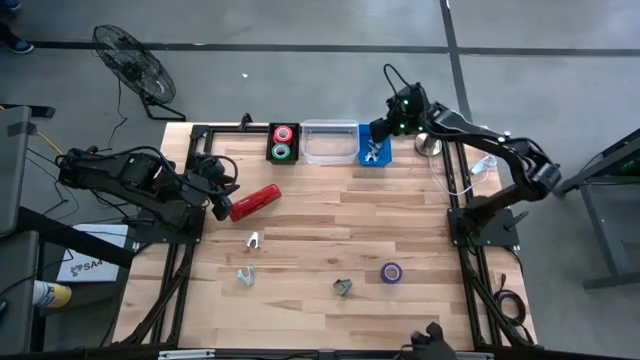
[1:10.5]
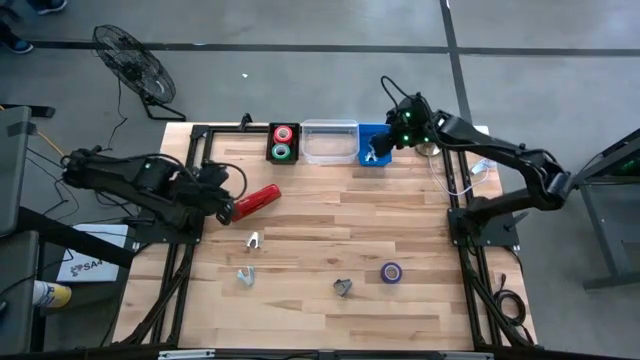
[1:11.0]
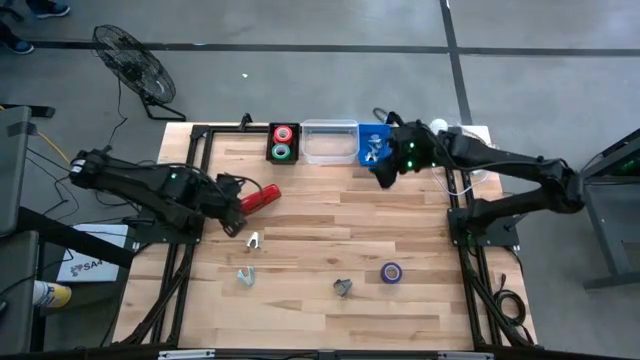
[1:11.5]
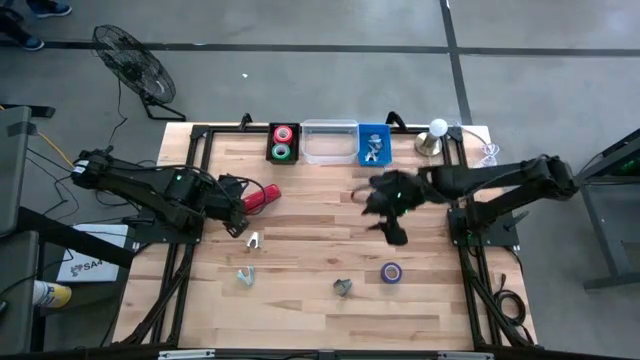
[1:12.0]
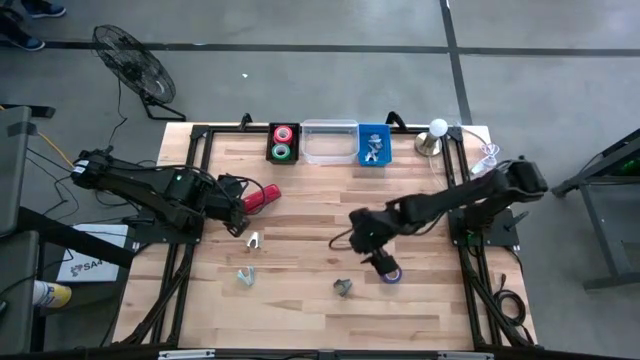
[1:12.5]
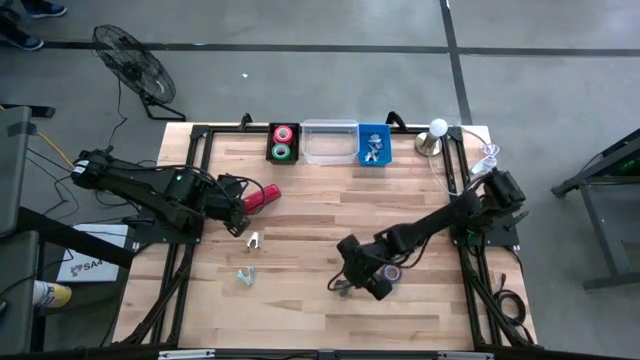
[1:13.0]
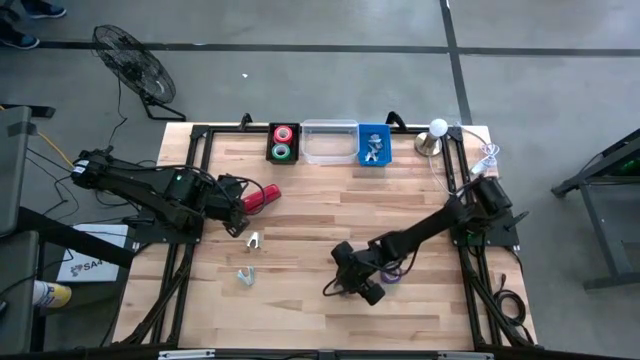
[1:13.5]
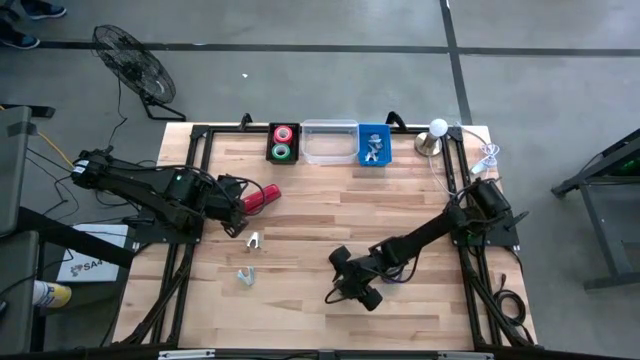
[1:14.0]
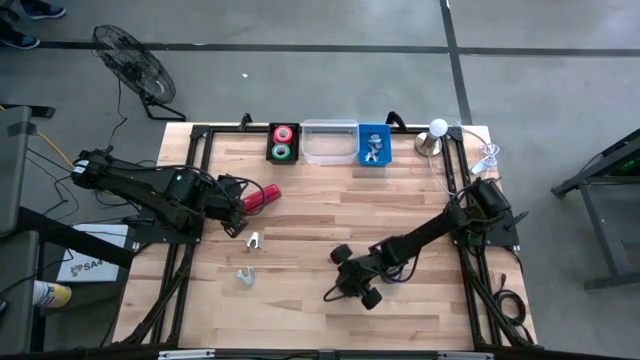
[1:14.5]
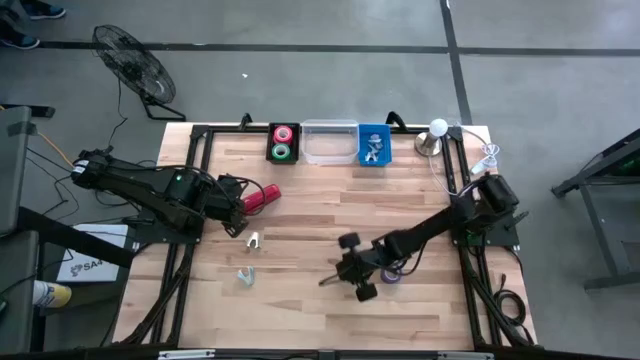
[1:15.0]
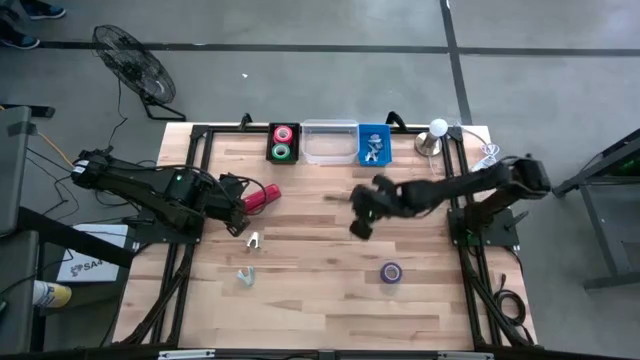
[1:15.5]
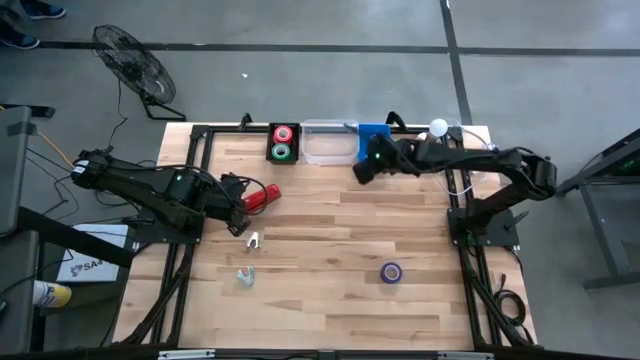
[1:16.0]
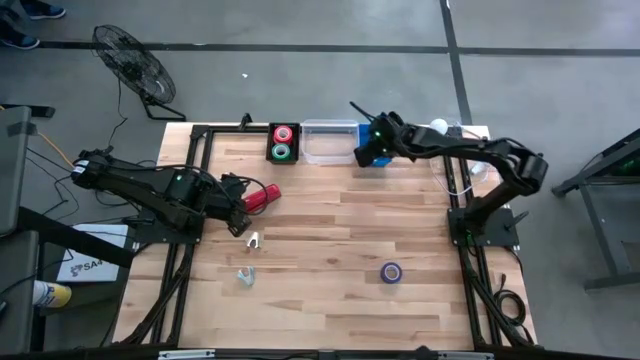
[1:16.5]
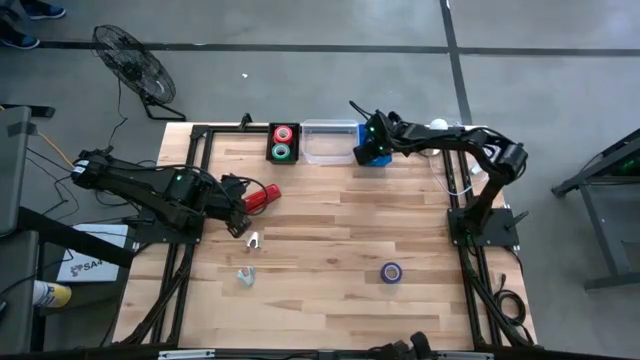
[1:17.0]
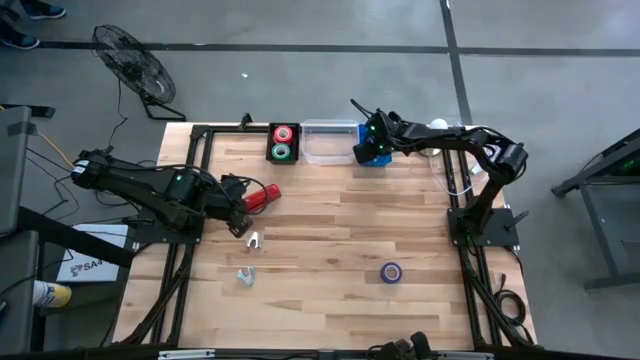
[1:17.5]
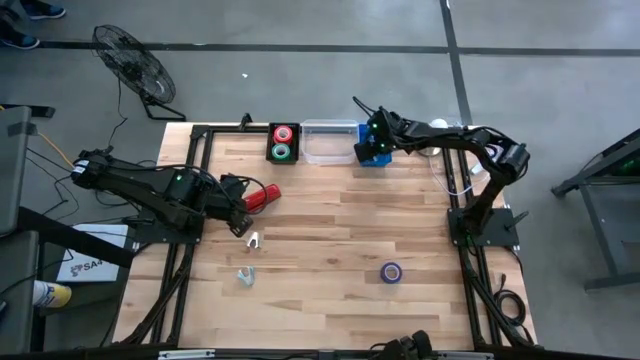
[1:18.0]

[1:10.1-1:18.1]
Task: Pick and place Stapler, Stapler remover, tape
Put the black staple remover into the blue bin

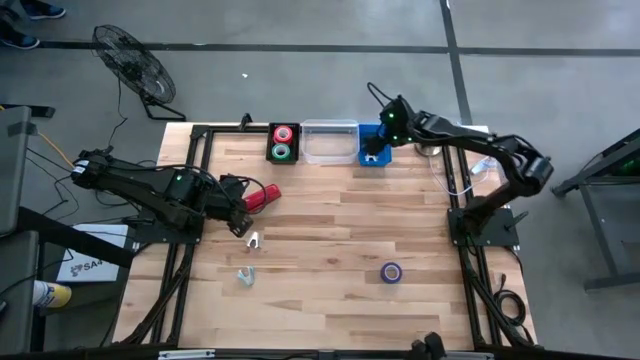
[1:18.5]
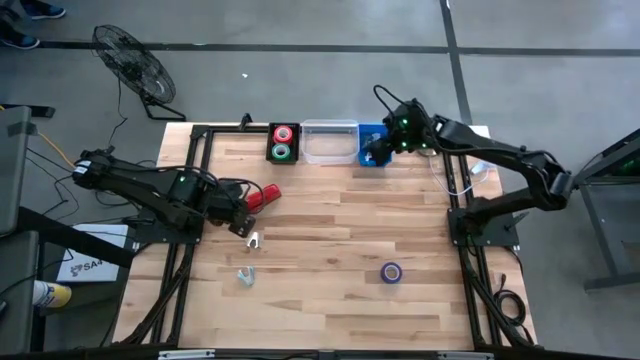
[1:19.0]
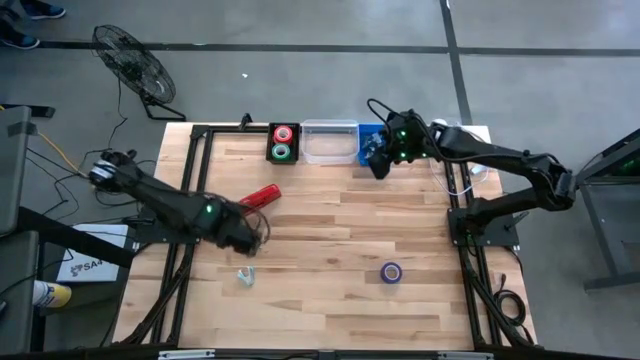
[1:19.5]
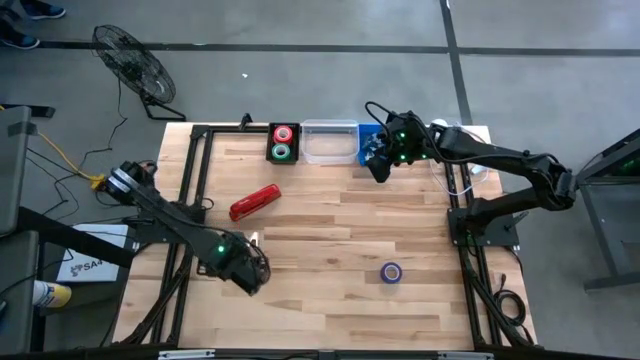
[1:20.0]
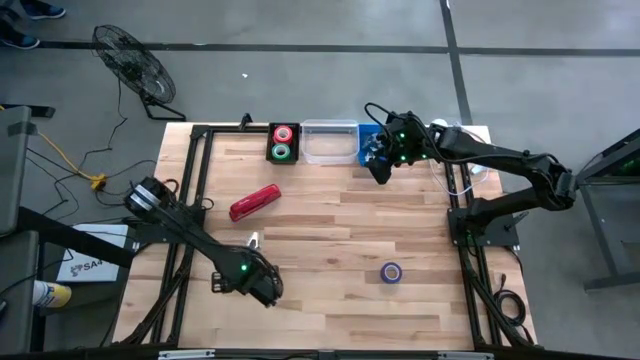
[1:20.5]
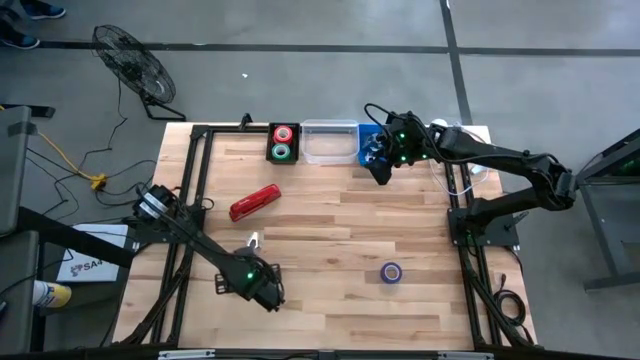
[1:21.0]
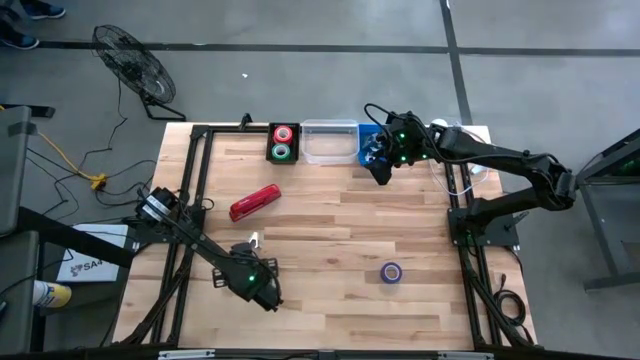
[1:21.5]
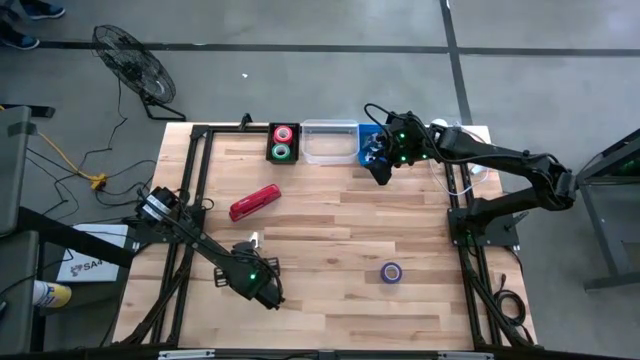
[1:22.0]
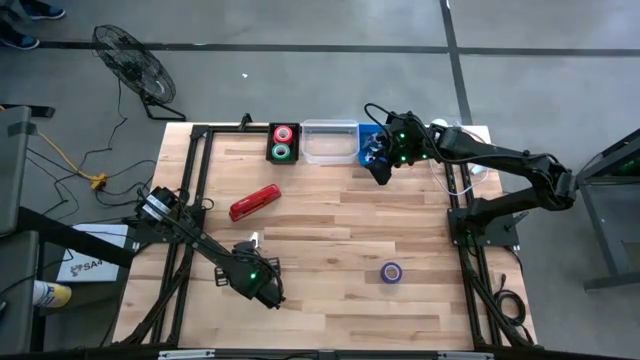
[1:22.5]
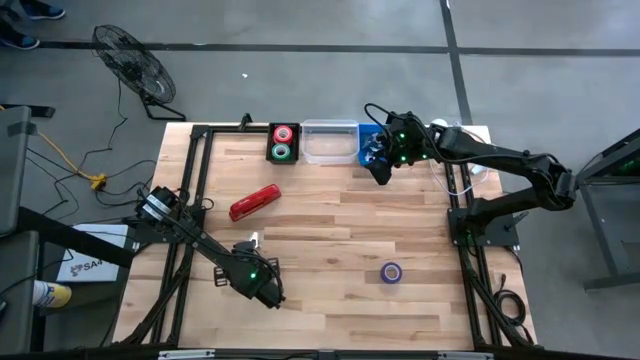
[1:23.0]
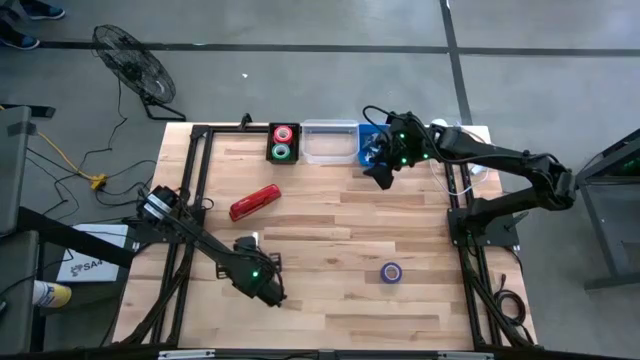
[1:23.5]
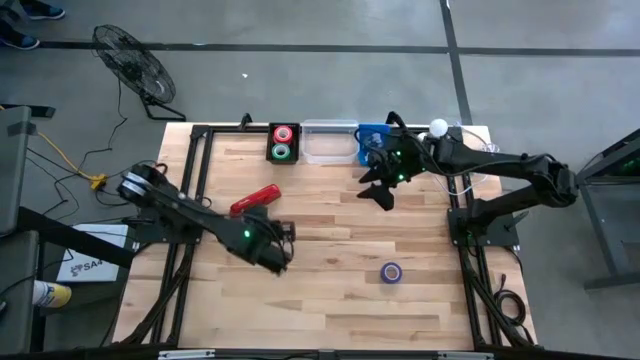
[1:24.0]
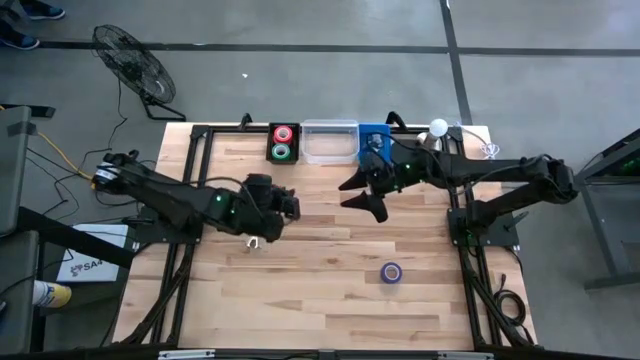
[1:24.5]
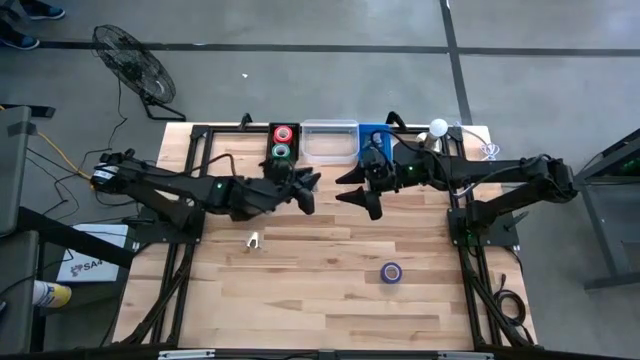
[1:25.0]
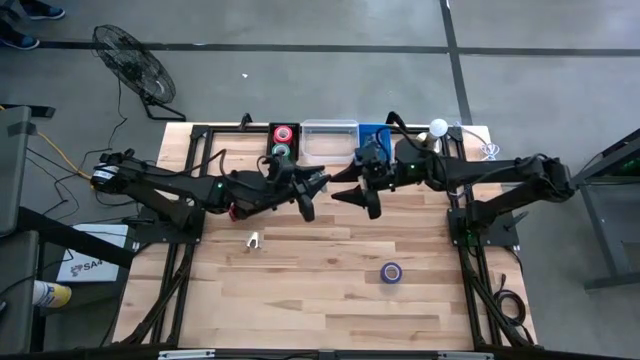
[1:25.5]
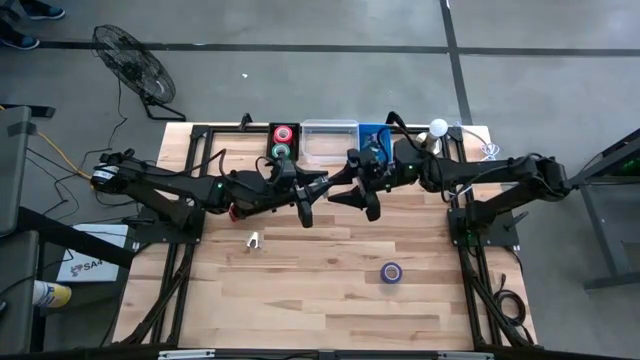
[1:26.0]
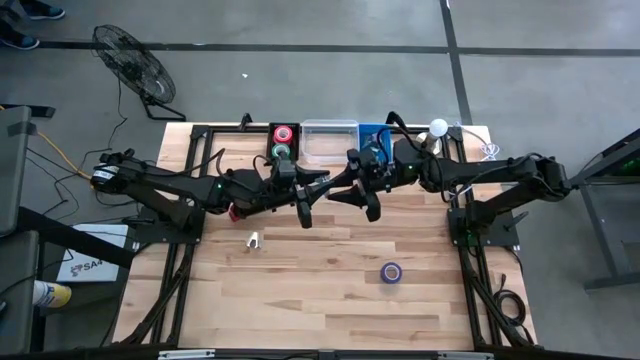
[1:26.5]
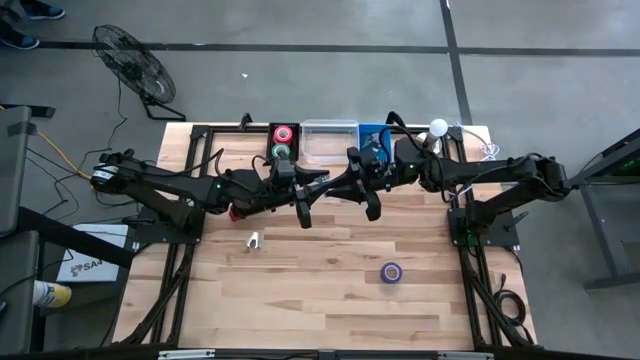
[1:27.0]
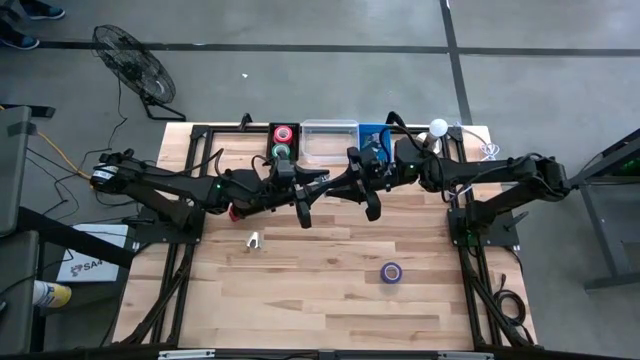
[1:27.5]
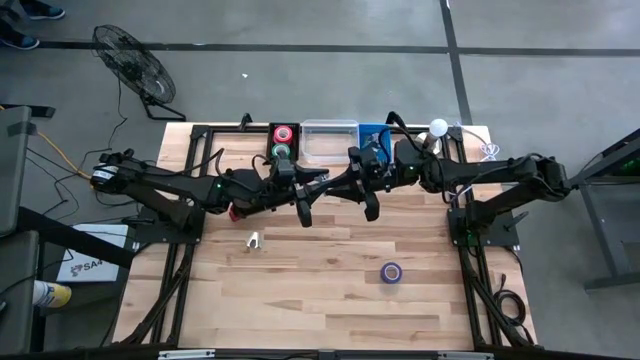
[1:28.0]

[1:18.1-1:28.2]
Put the blue staple remover into the blue bin

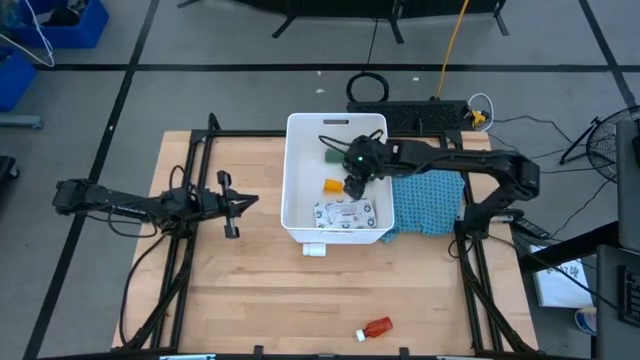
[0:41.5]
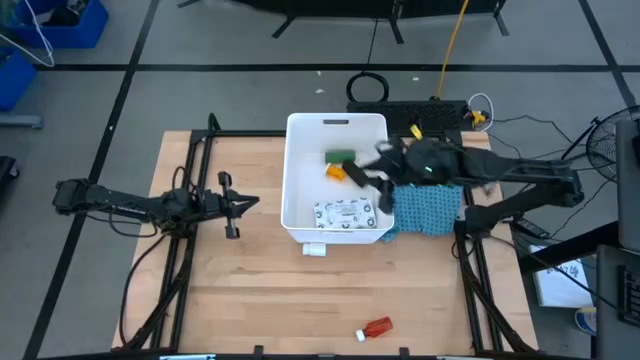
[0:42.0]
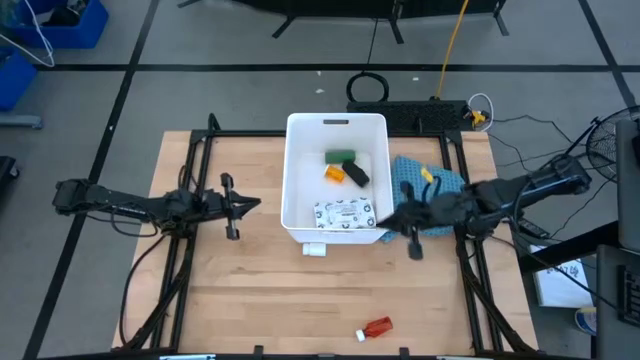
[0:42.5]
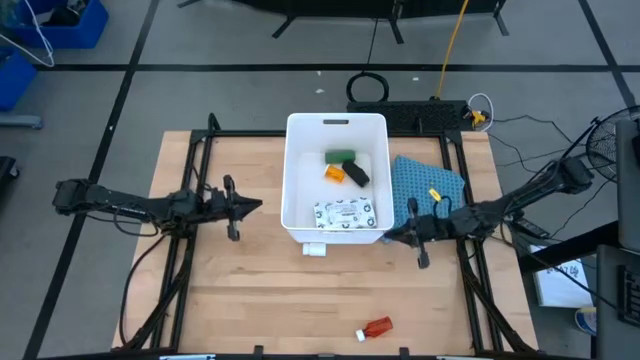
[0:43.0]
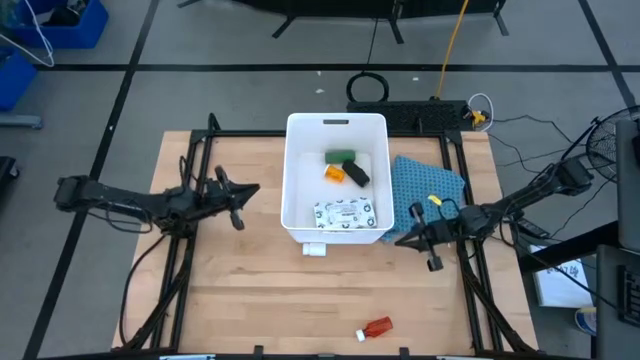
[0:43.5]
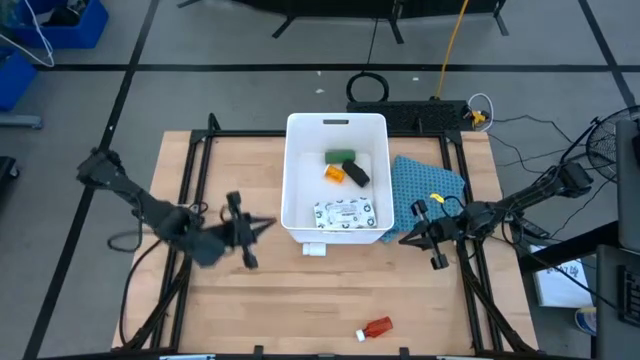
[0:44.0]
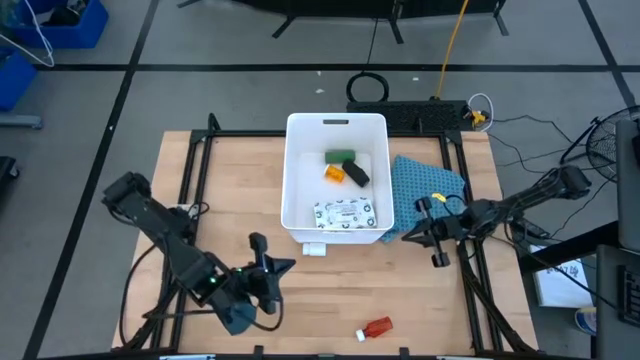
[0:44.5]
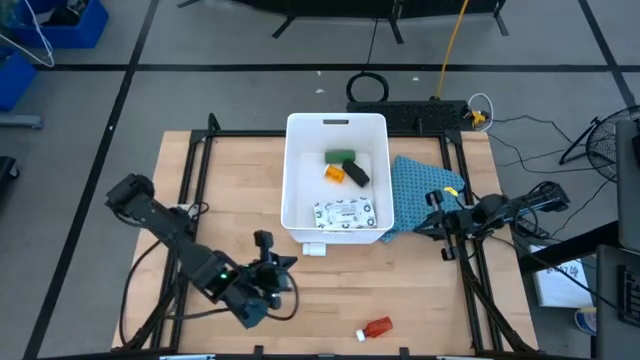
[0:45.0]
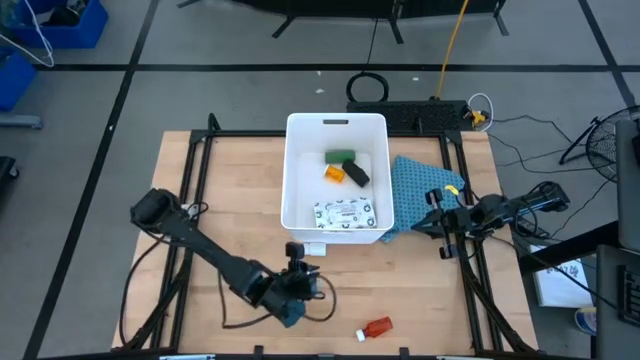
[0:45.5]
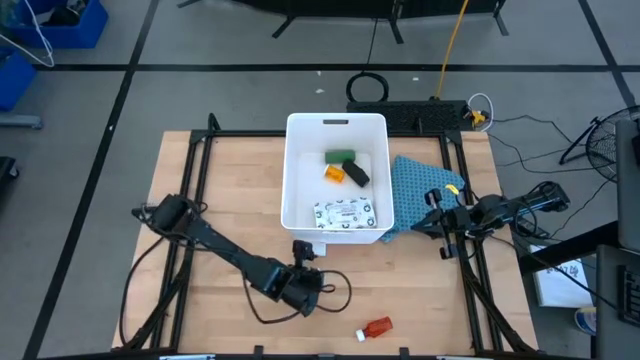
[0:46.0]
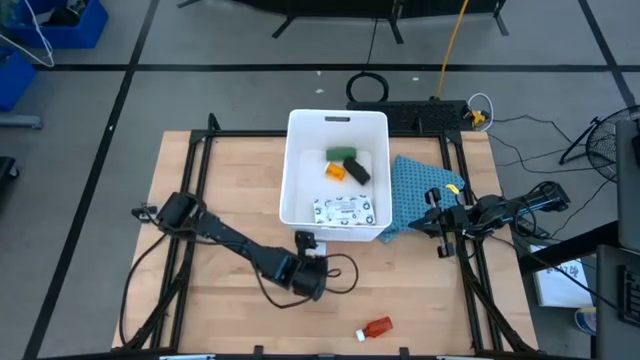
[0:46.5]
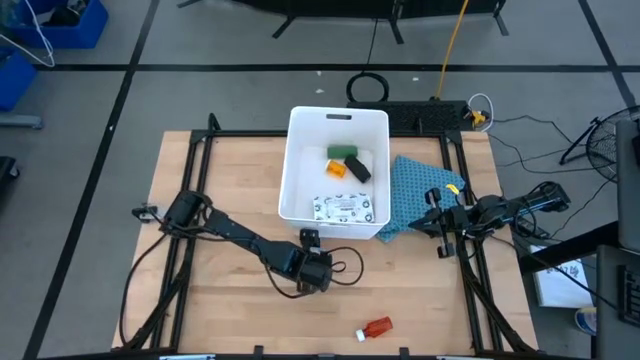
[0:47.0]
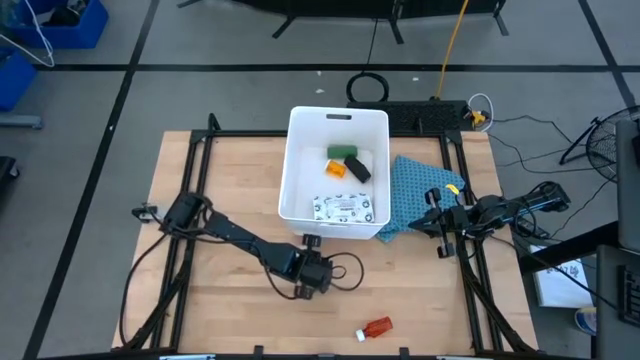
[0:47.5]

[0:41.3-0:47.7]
Task: Pick & place medical supplies in basket/bin
Put the white medicine bottle into the bin
